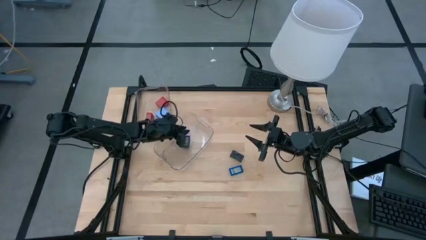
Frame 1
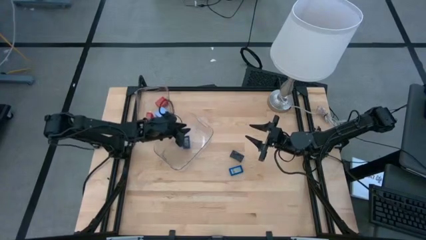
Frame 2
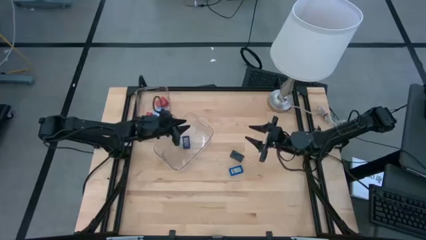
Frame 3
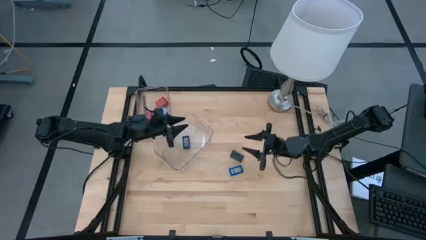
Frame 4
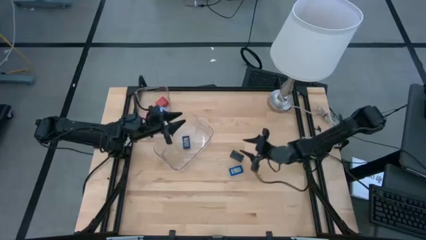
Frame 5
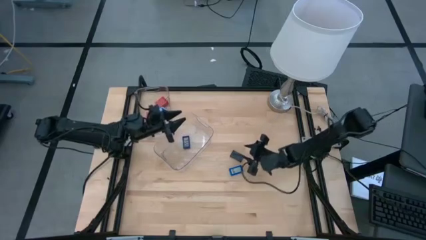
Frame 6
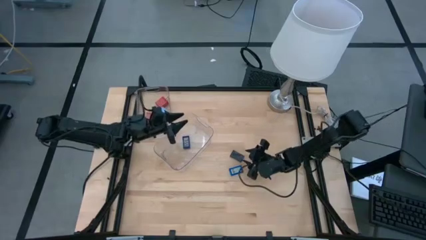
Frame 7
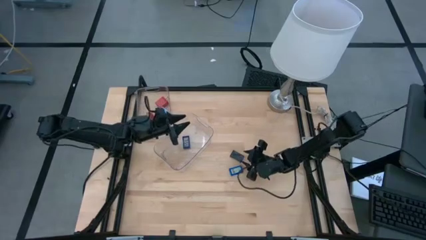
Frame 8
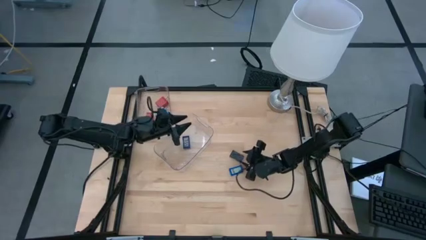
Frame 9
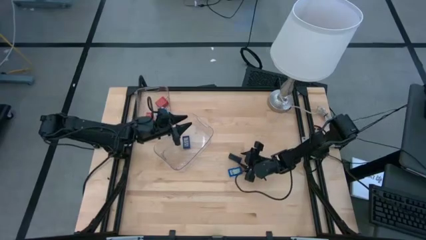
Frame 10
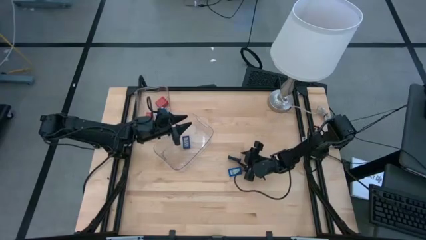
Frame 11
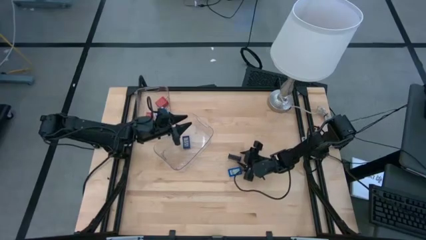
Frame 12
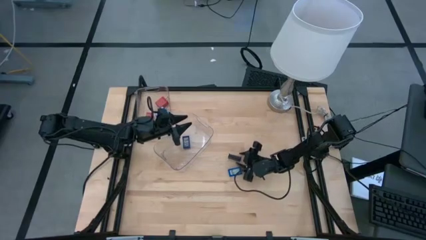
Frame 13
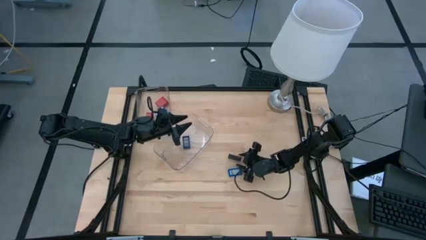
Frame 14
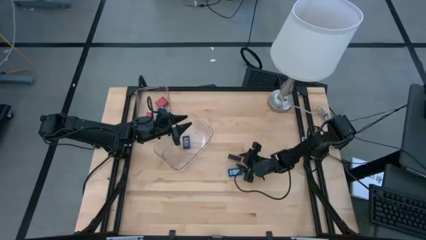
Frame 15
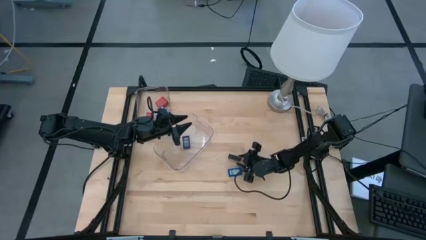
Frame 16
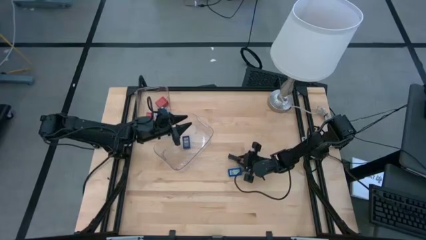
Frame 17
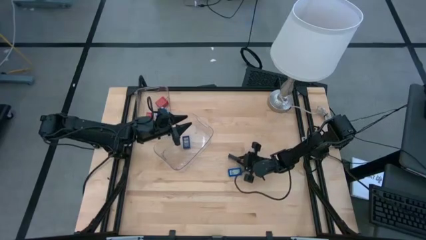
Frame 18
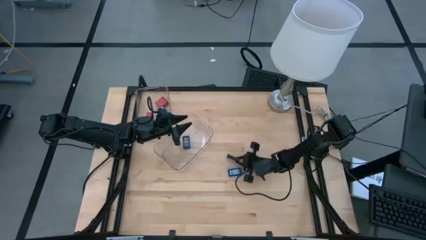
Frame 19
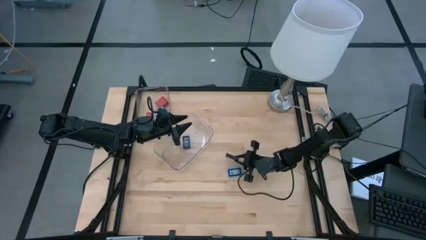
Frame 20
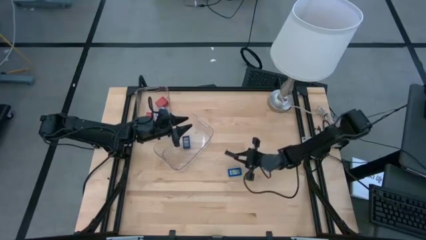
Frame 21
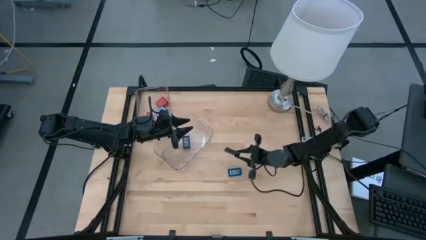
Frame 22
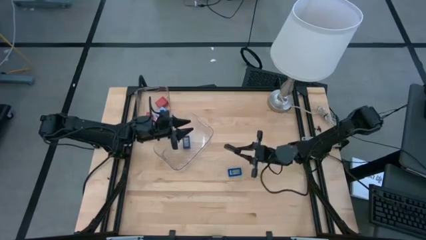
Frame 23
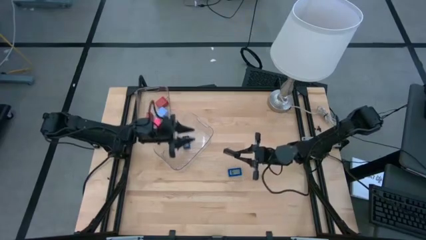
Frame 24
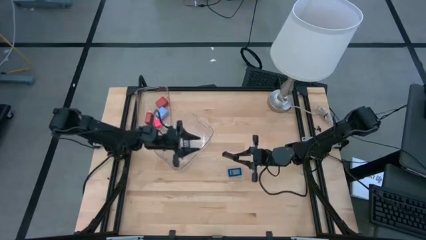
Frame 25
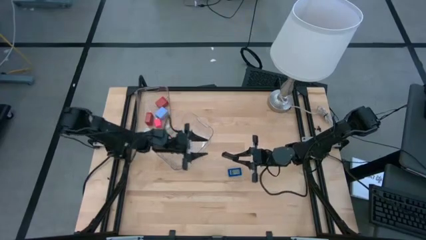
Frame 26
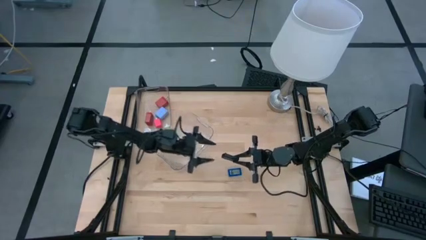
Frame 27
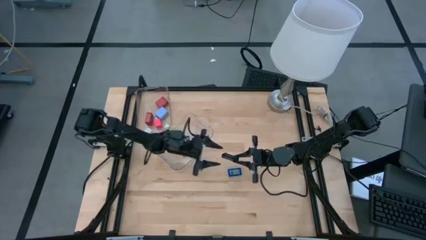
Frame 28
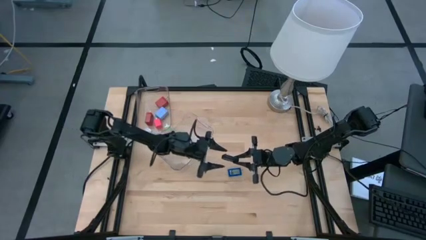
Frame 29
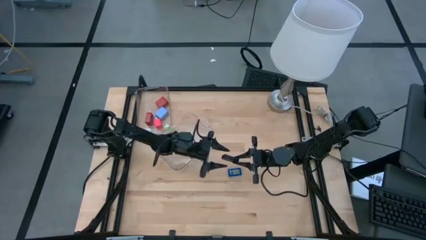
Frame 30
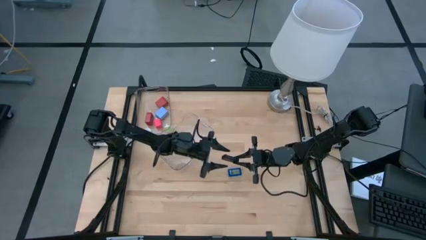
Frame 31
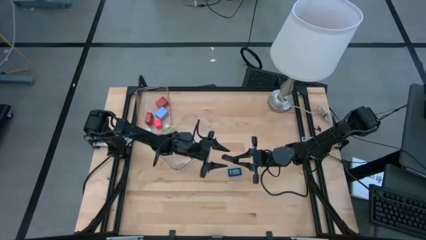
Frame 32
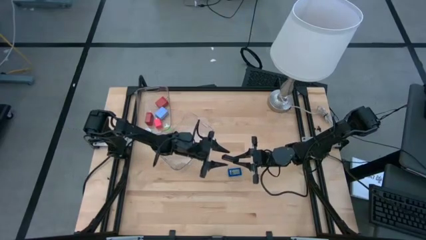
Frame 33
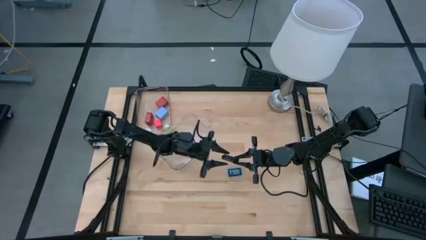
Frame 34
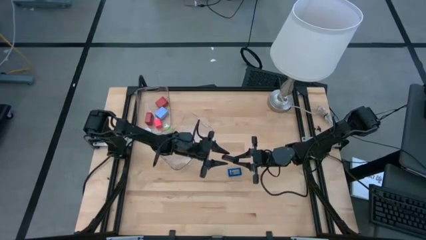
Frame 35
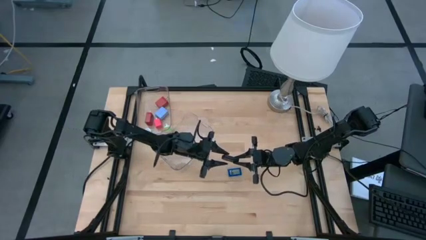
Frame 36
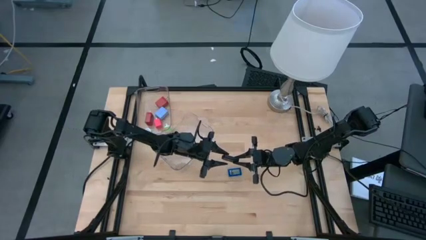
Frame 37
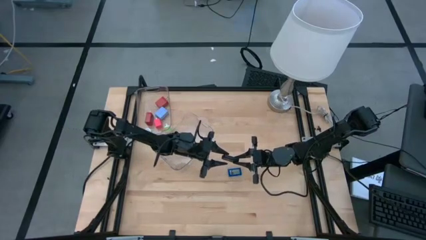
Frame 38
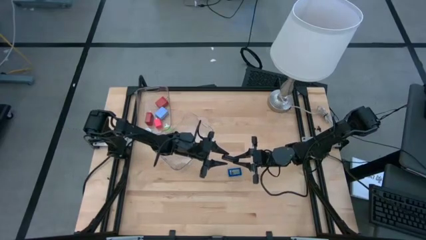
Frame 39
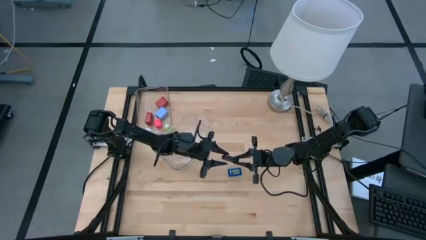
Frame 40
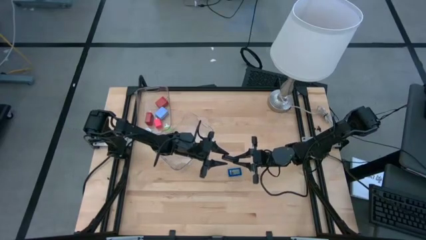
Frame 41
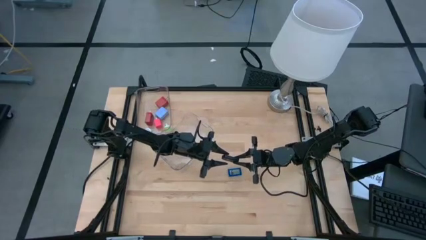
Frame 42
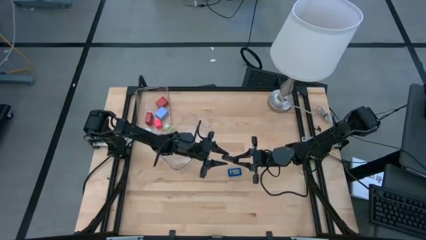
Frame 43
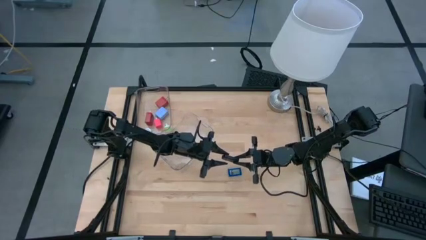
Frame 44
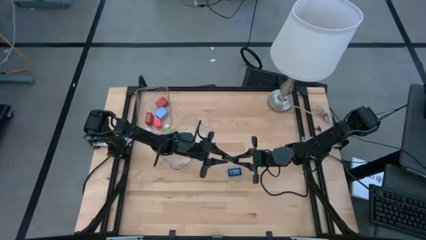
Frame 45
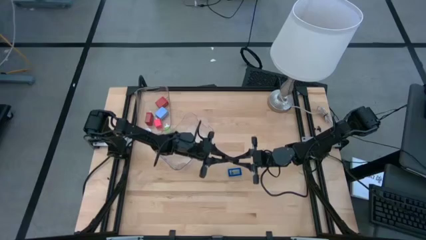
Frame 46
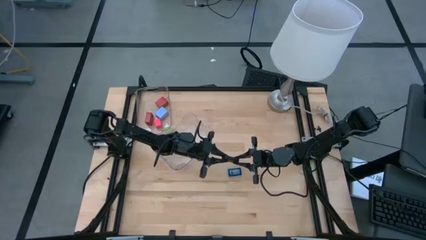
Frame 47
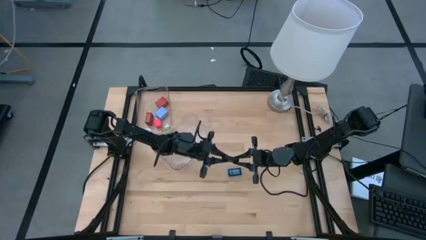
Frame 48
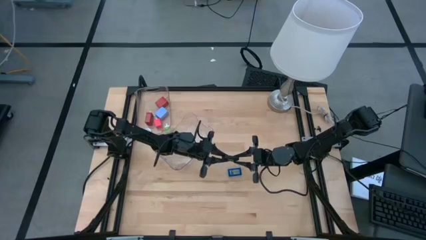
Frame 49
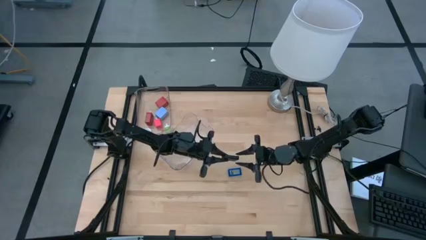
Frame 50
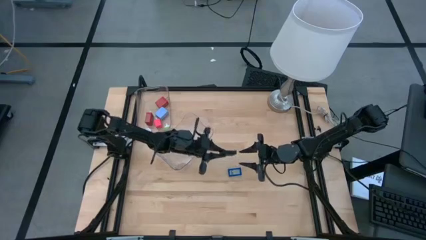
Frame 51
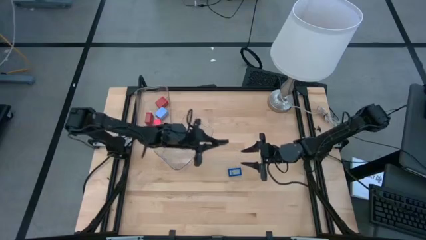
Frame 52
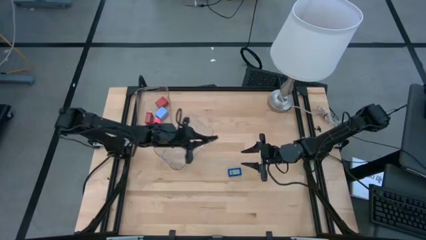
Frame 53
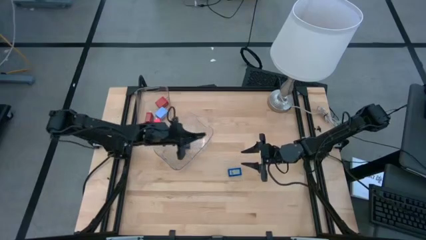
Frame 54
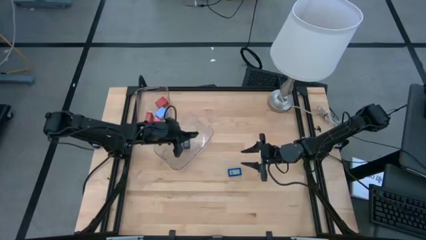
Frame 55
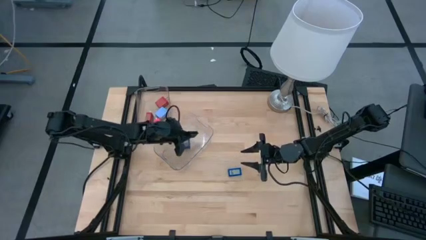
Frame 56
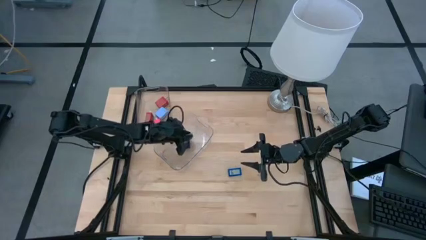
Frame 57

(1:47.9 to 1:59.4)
Task: Pick & Place Office items
Put the black digital clock into the bottom transparent bin

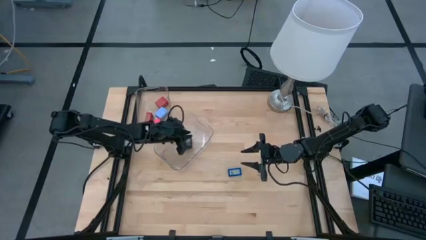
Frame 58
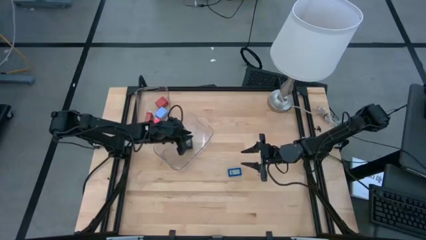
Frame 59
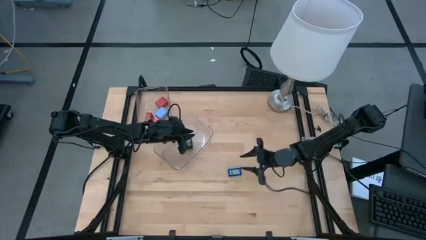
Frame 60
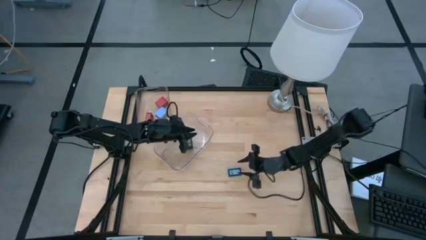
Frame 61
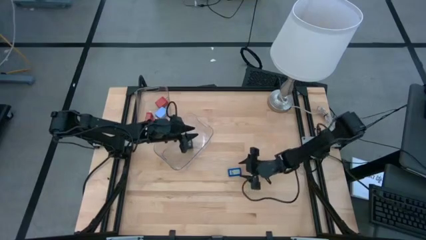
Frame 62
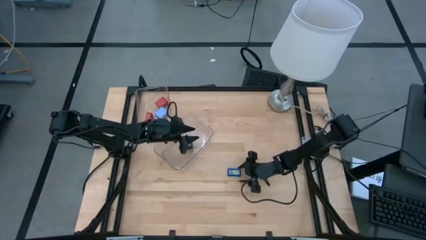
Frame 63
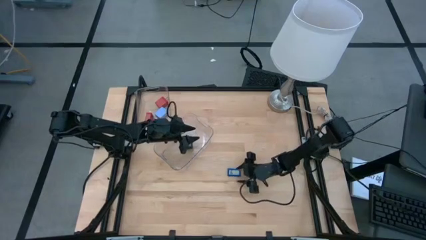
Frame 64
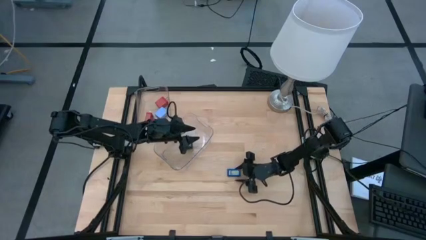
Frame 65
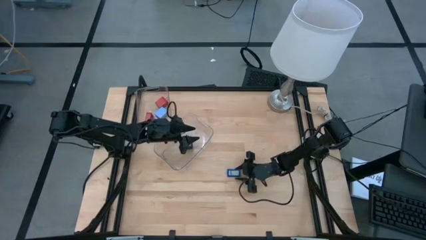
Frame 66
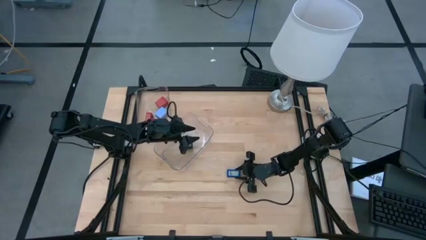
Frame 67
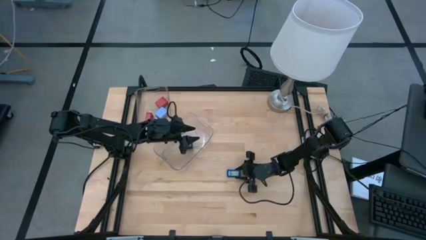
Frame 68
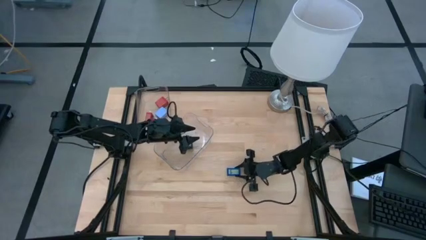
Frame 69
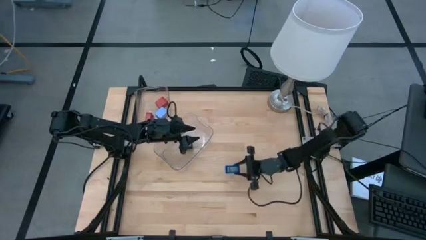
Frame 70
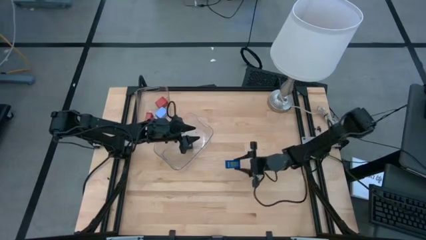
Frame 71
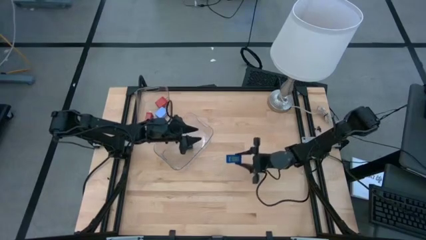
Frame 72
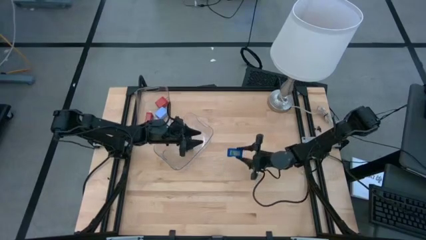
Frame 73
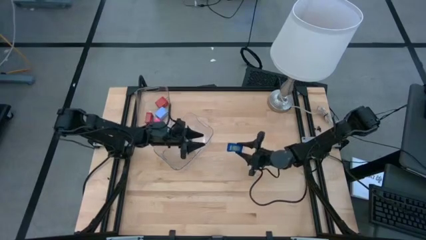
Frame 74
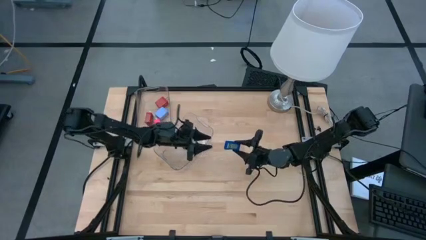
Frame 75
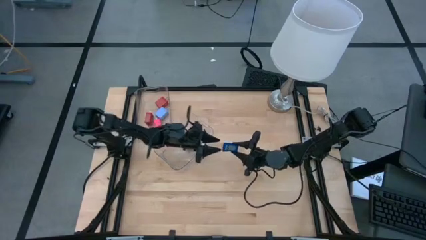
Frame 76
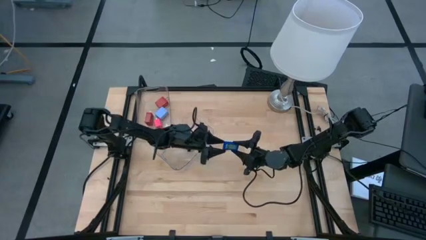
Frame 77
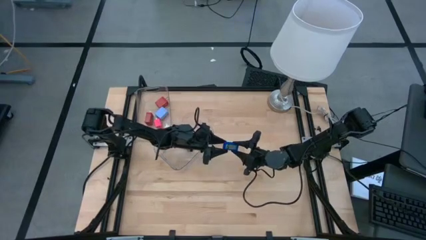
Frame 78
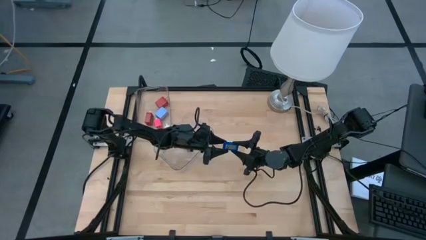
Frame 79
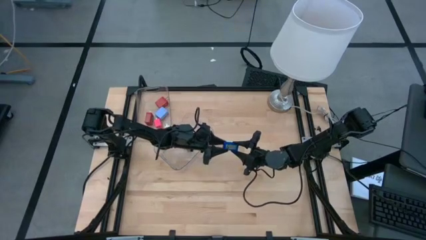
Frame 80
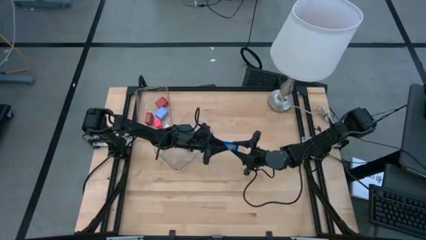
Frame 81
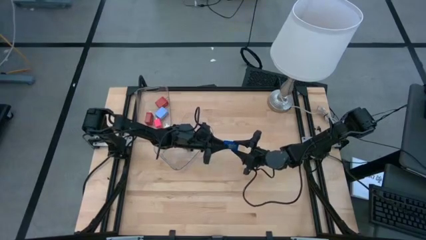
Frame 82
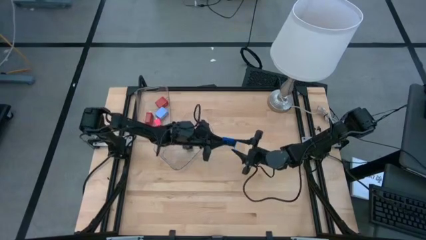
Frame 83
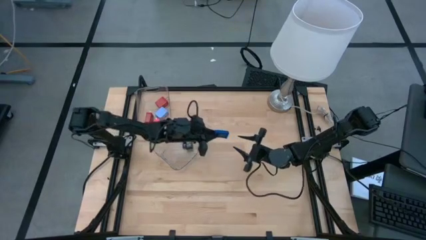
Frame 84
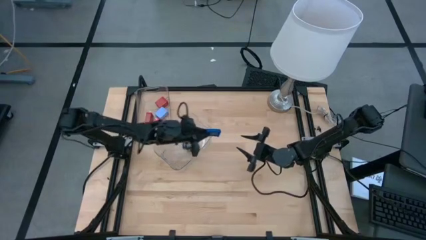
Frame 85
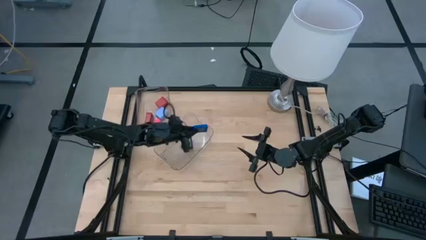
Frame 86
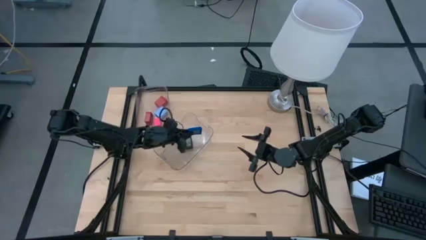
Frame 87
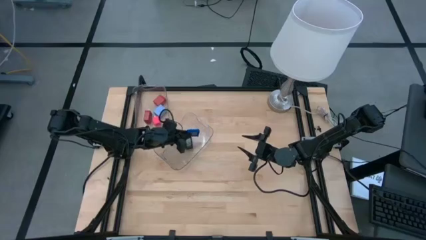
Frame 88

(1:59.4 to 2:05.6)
Put the light blue digital clock into the bottom transparent bin
